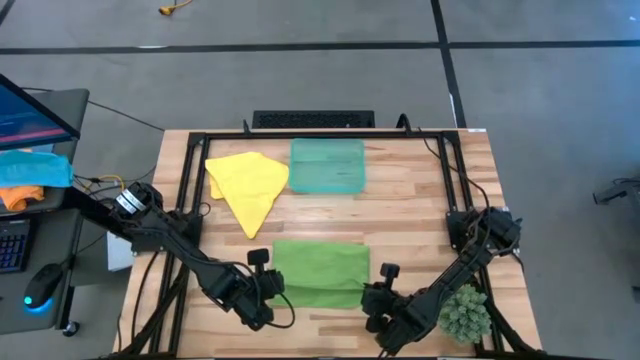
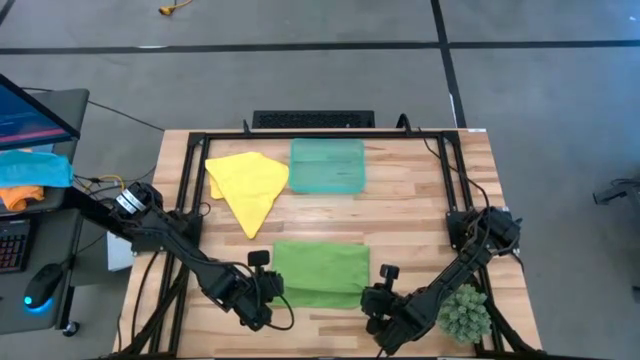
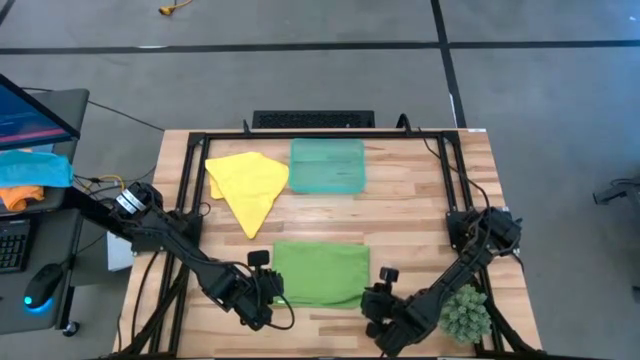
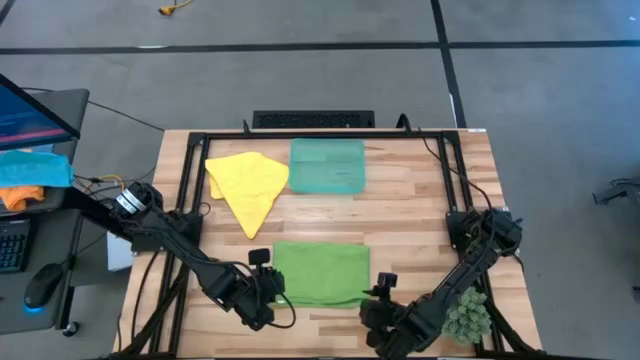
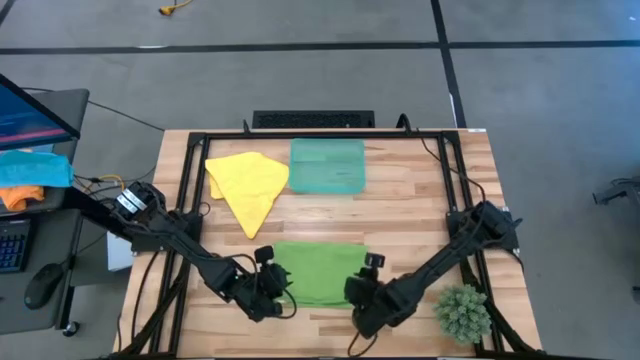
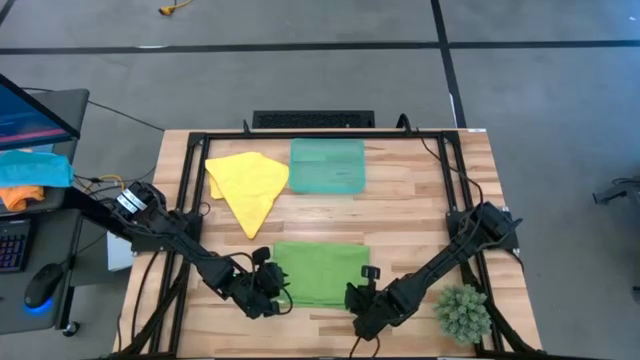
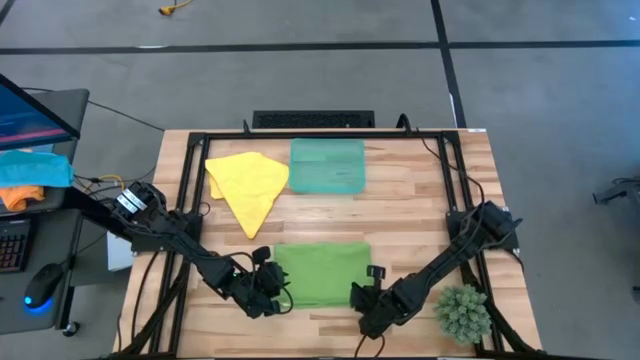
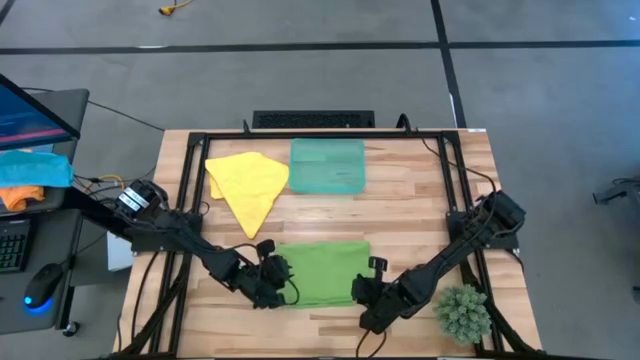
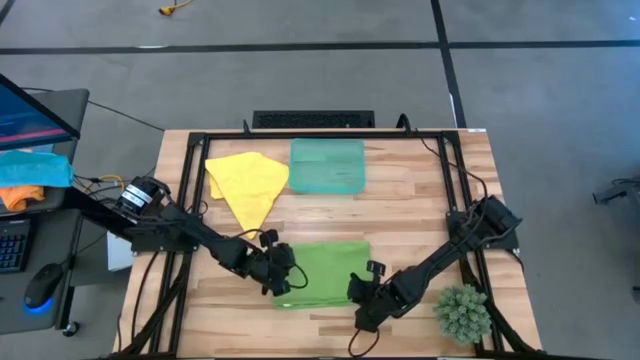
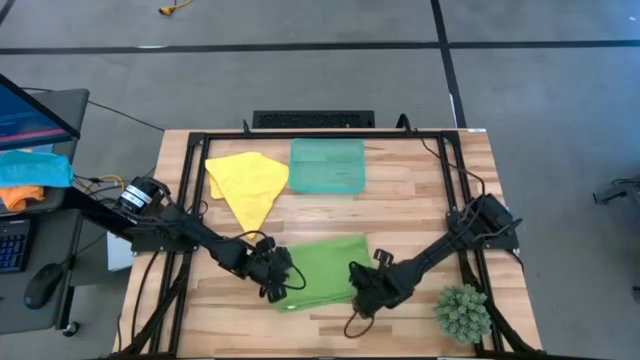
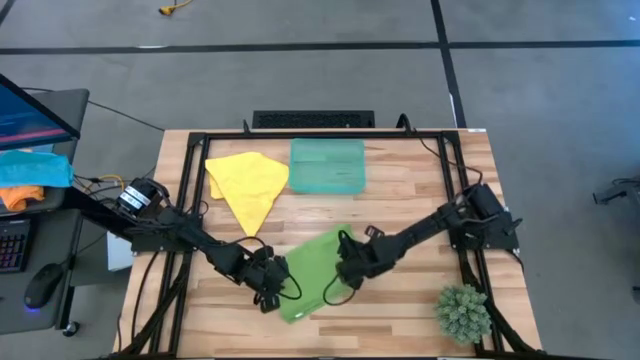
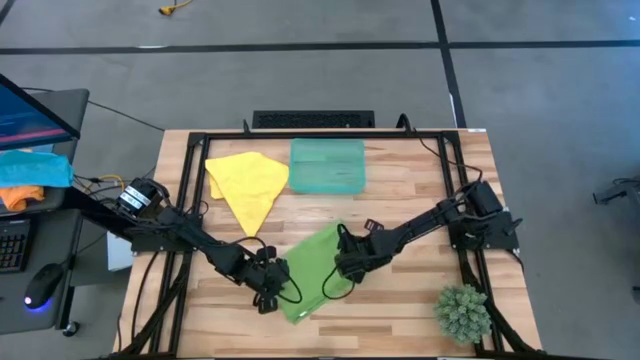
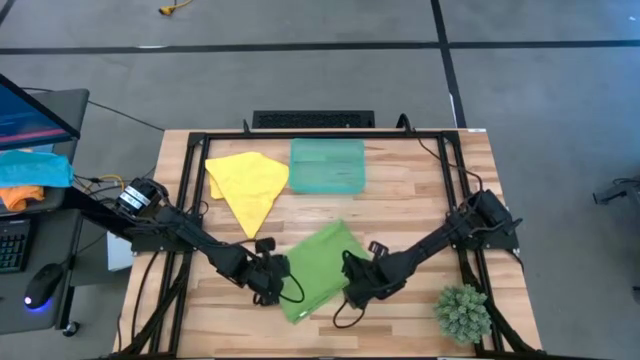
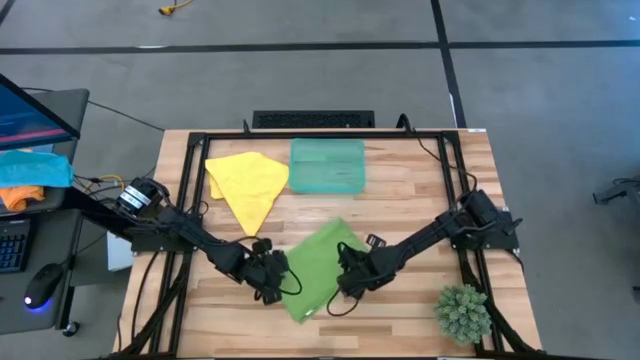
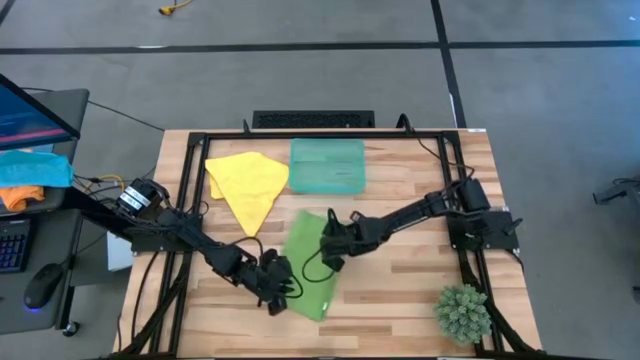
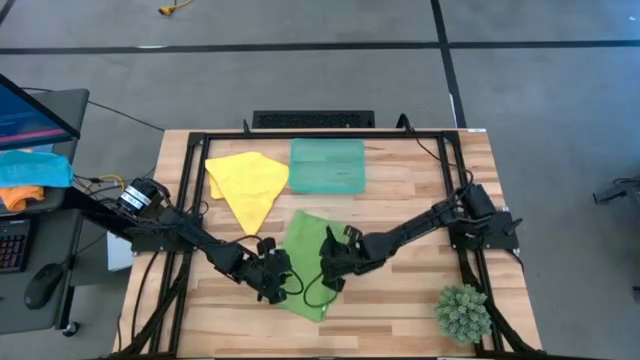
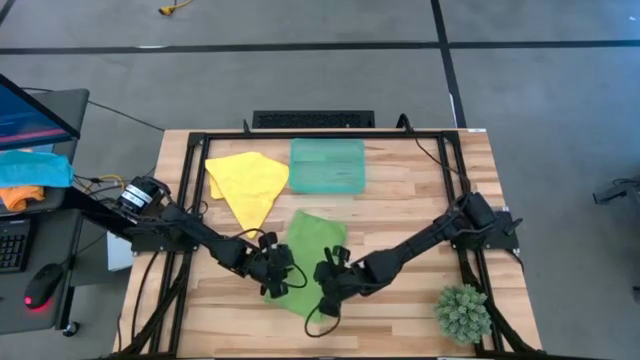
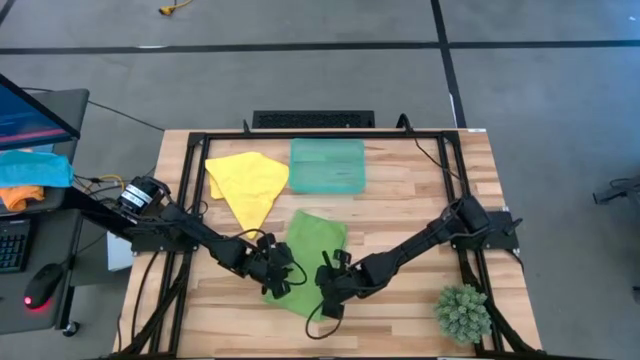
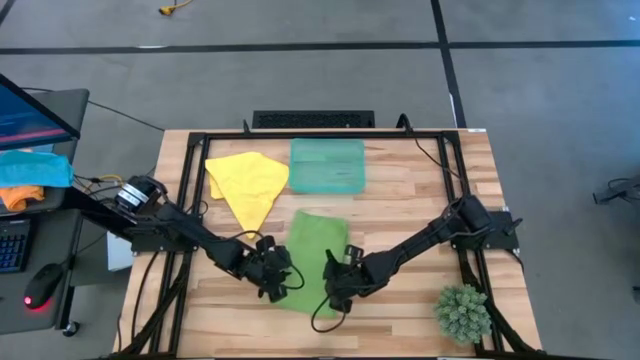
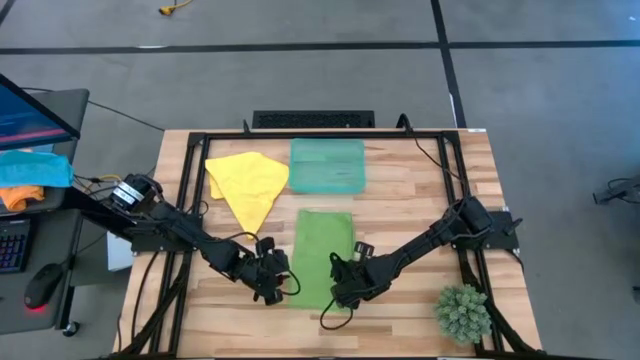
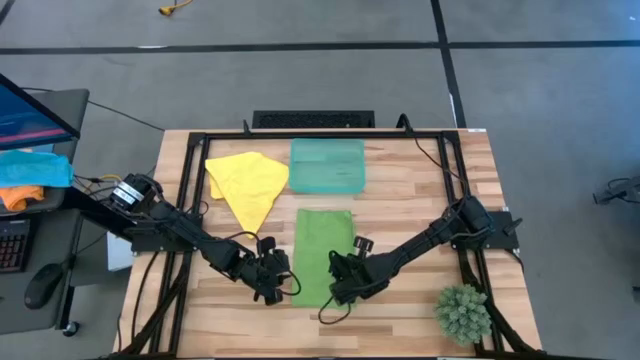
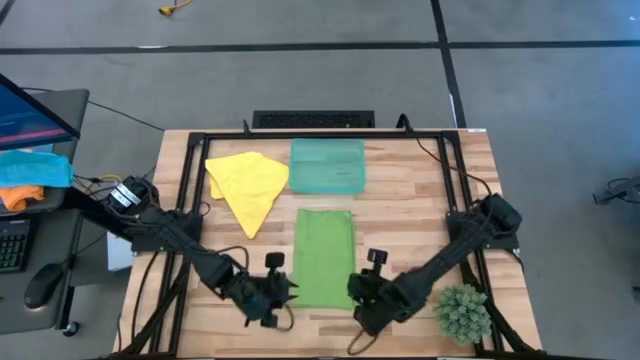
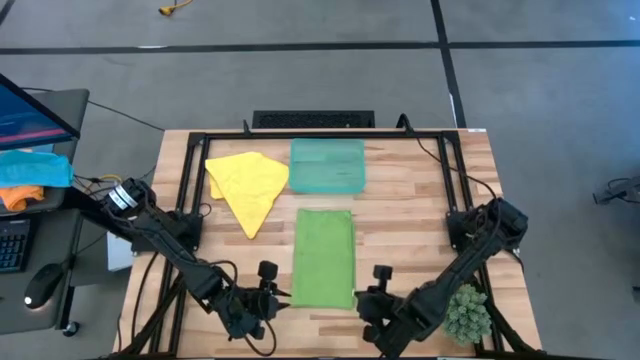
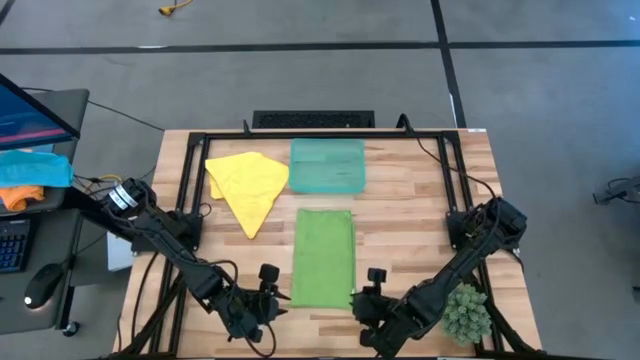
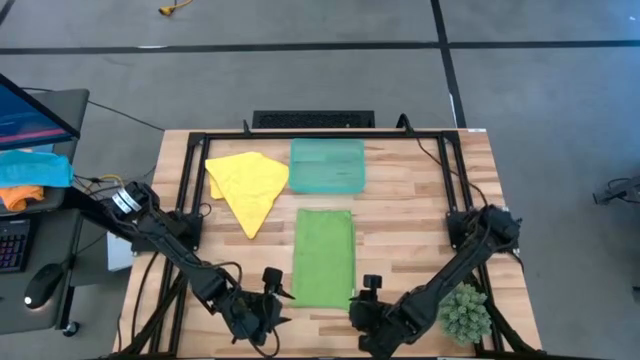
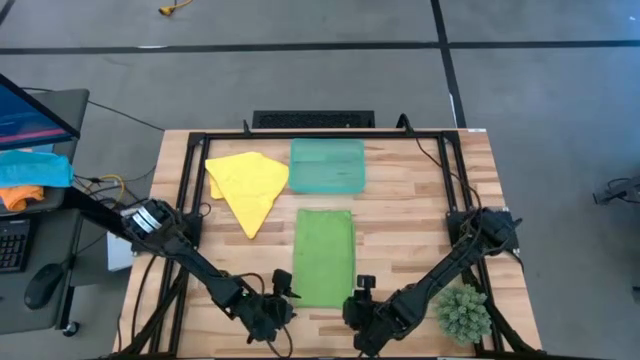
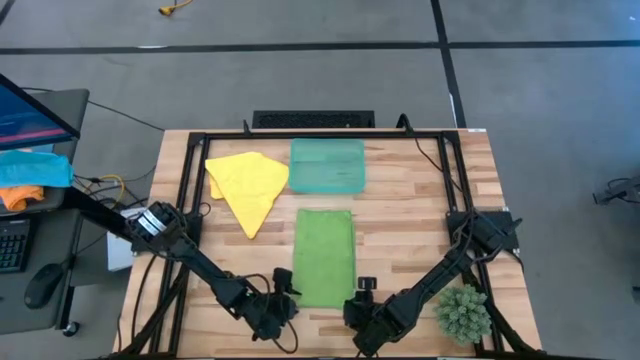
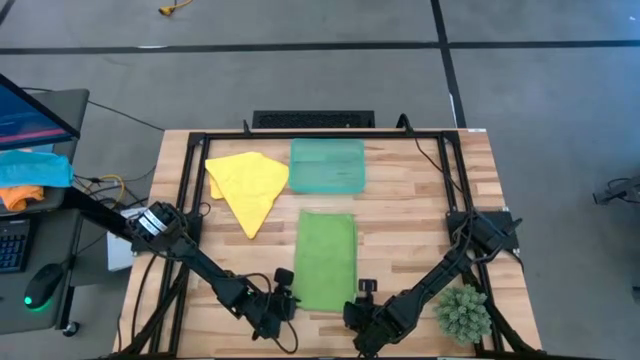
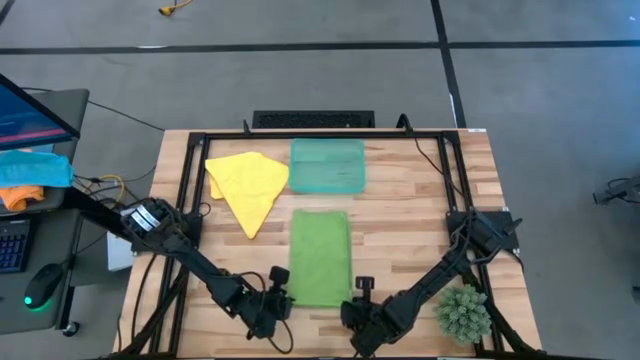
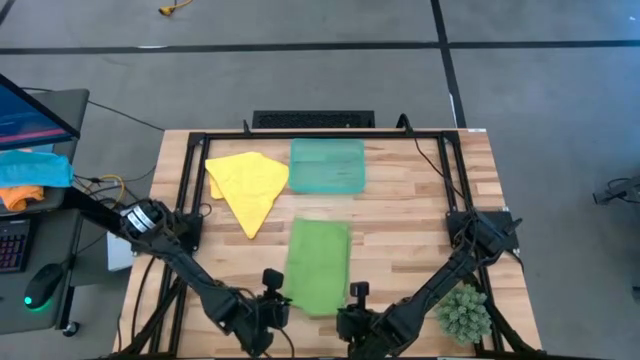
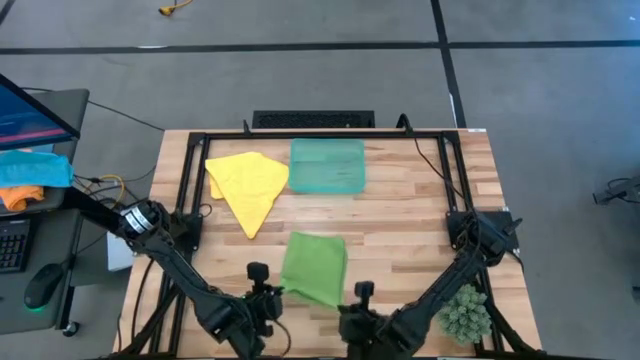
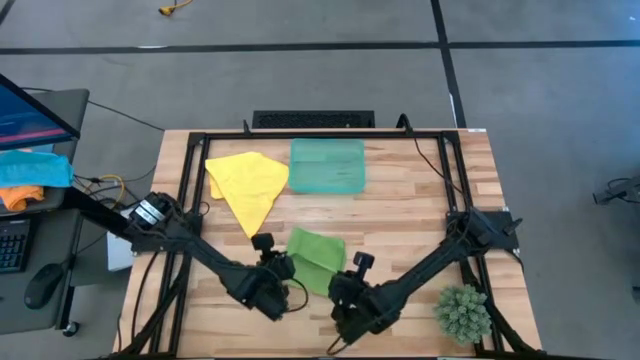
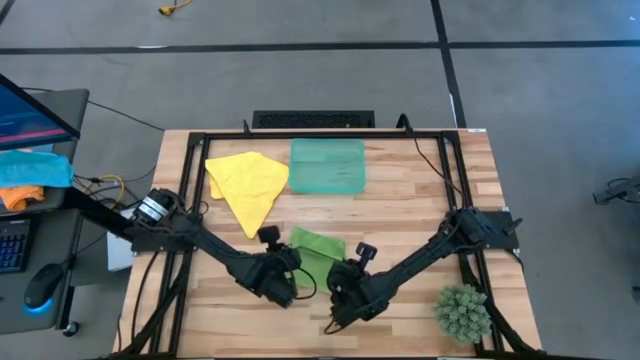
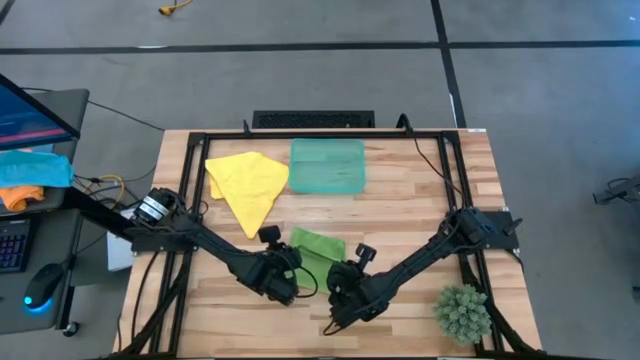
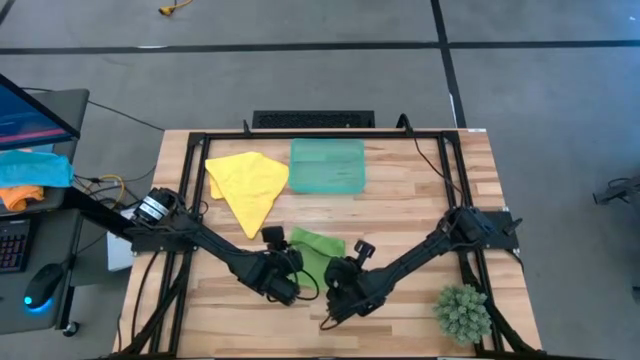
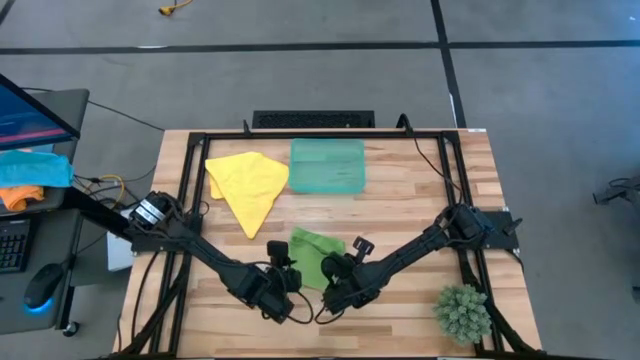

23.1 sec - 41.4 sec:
Task: Roll microfiber towels into tight, uniform cylinder then place into a basket
Fold green microfiber towel

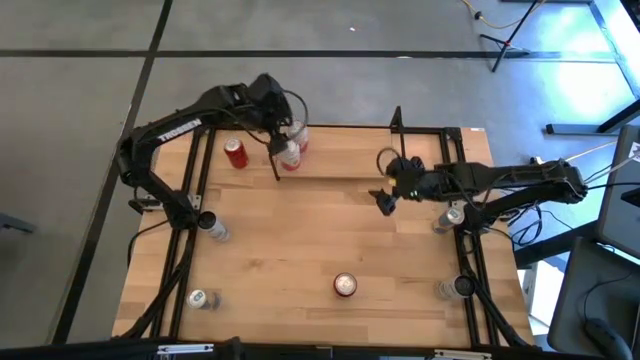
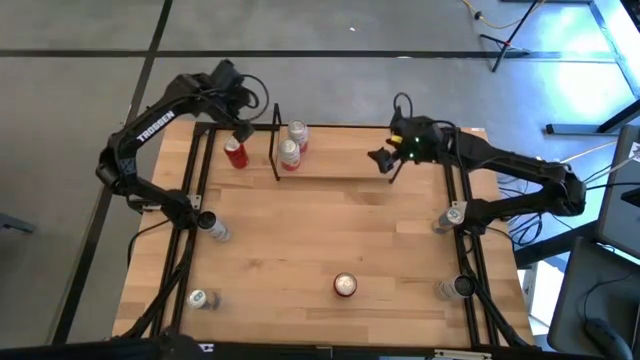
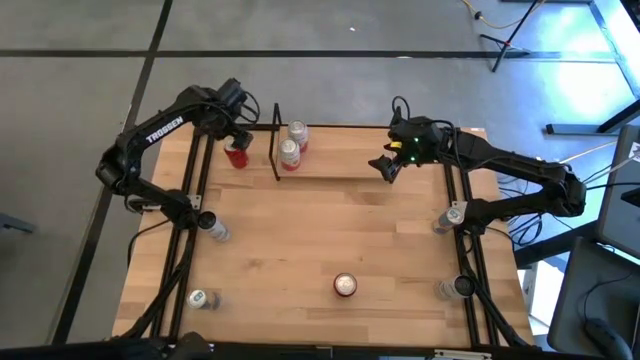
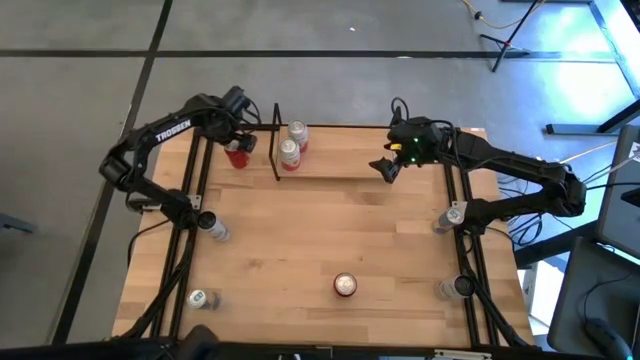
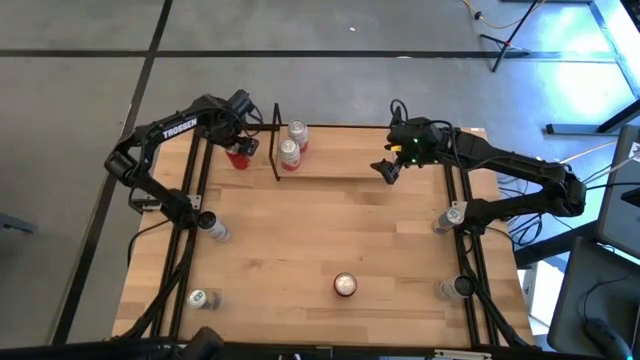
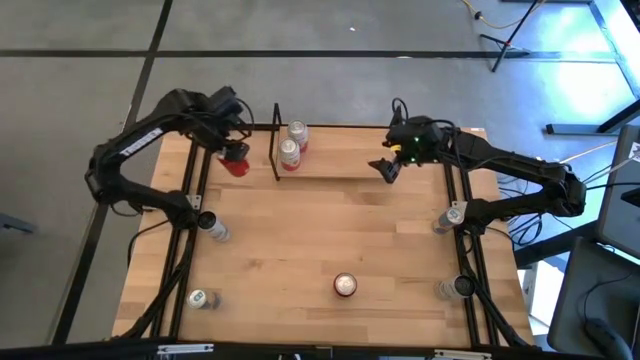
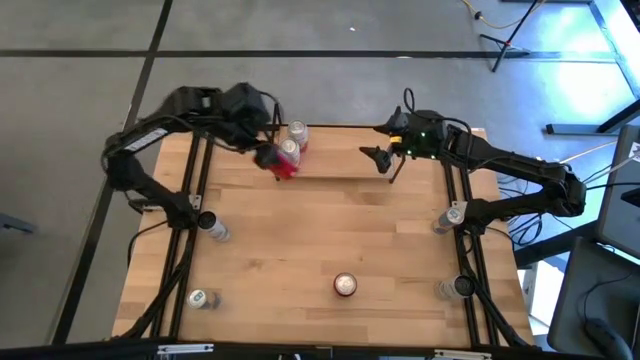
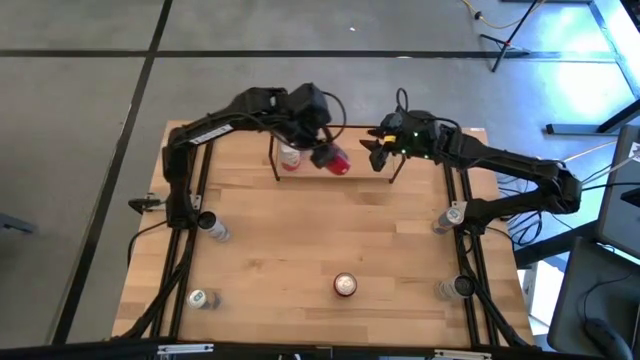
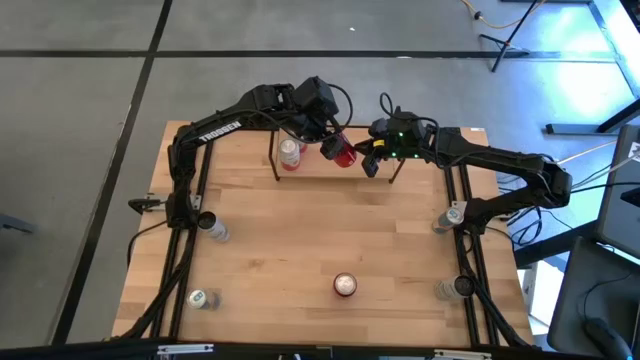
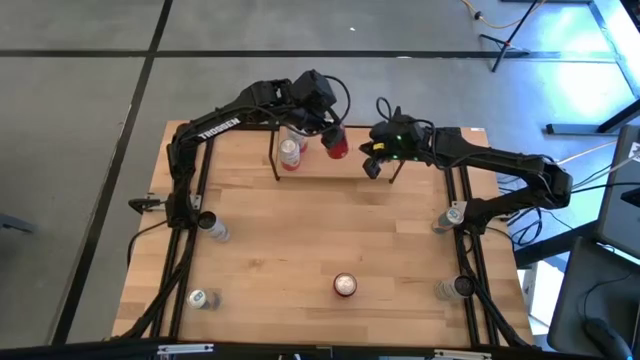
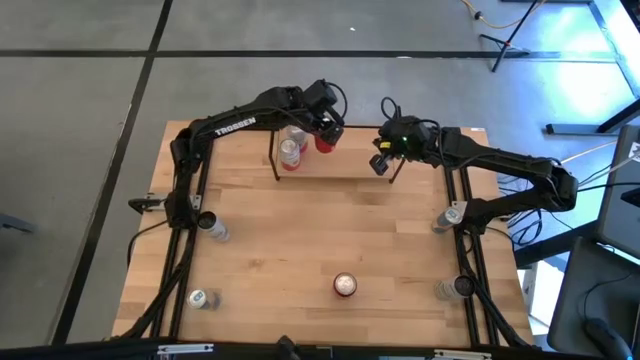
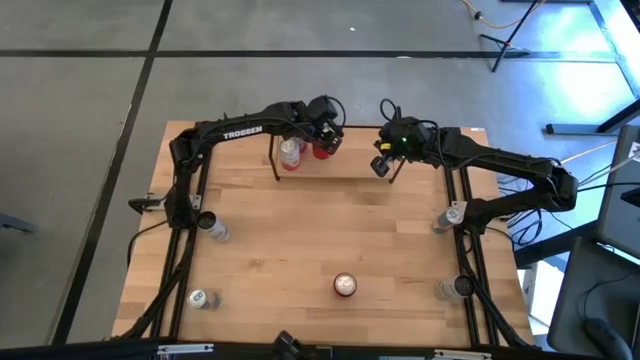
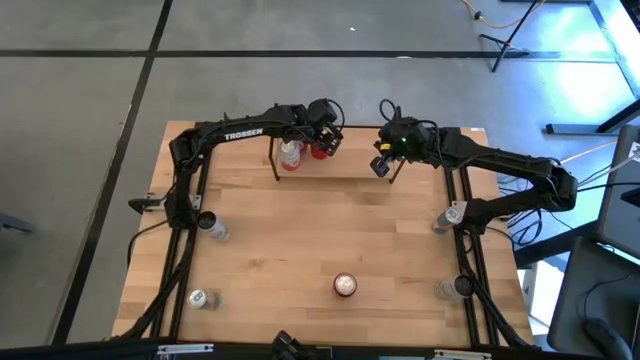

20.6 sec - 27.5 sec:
Task: Place canned beverage on shelf
Put the top red soda can on the shelf
